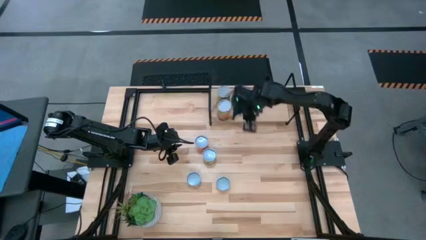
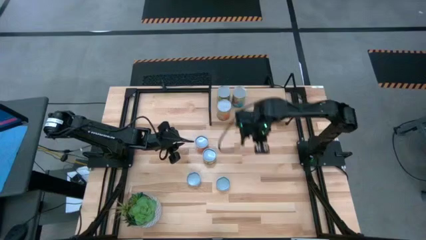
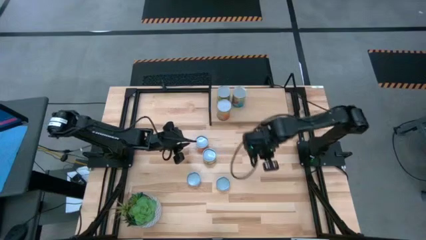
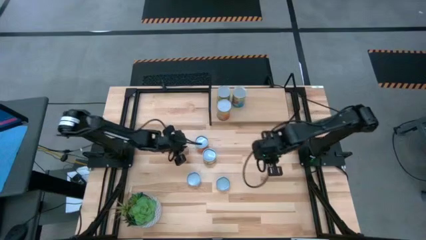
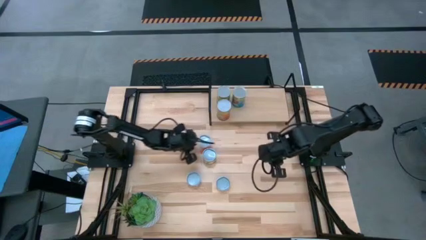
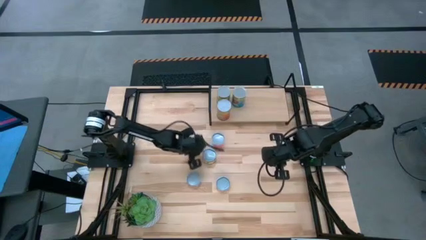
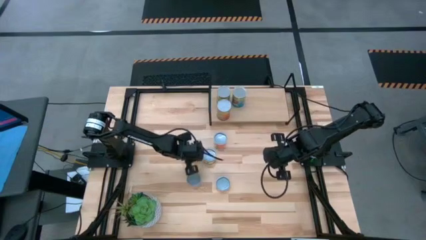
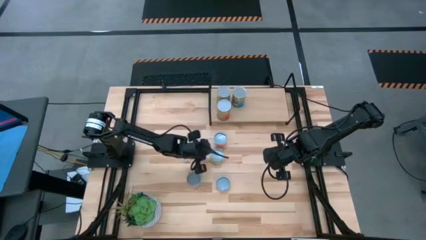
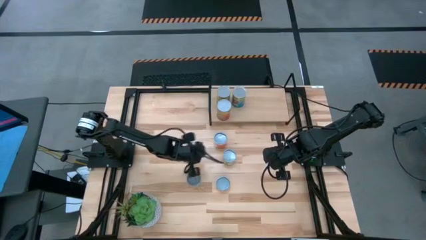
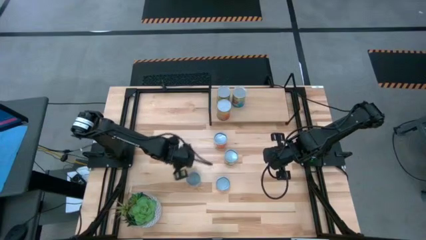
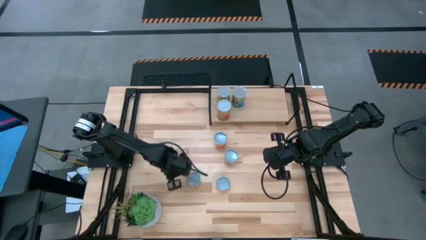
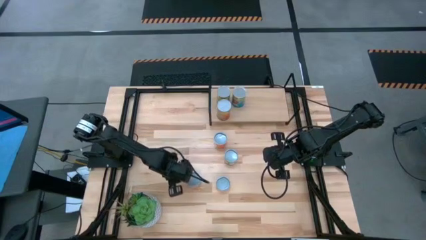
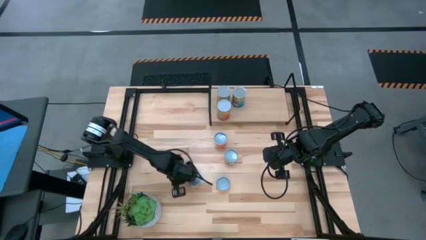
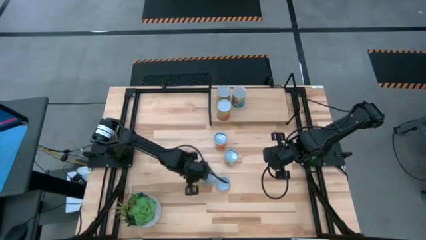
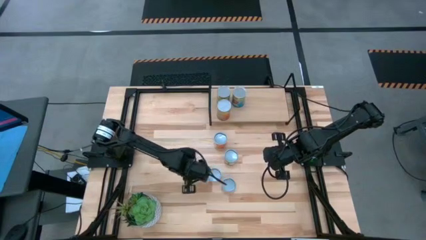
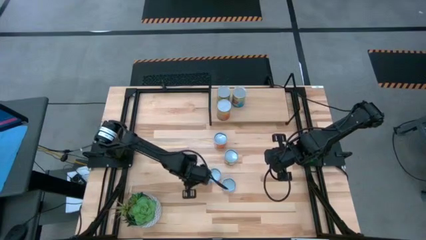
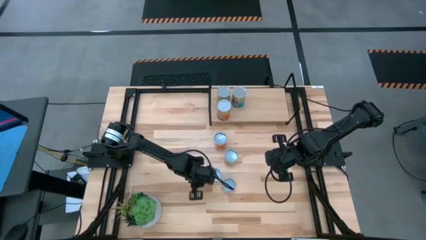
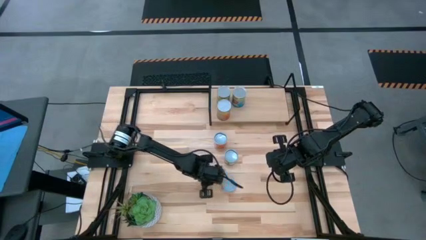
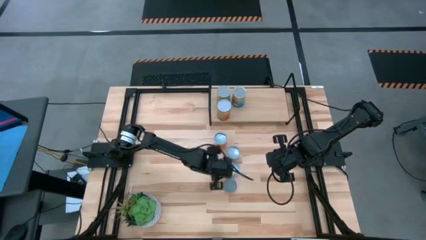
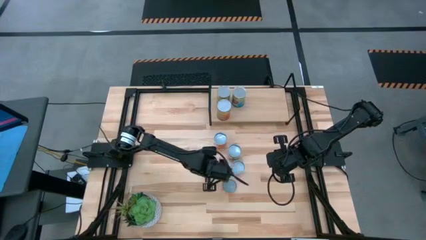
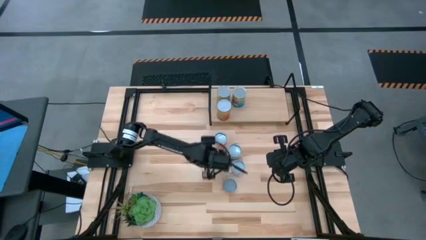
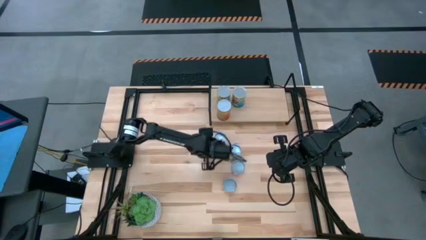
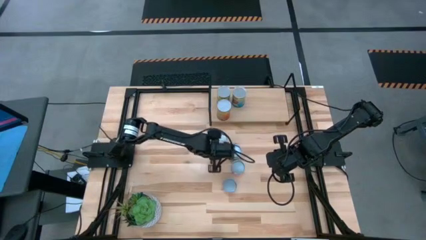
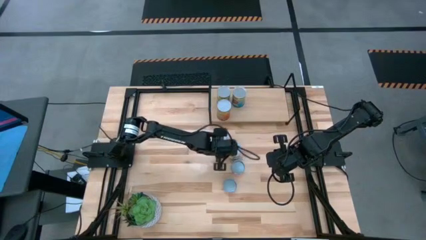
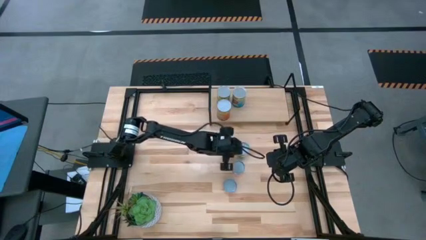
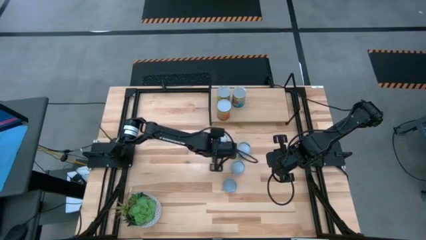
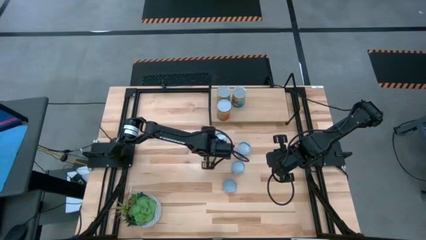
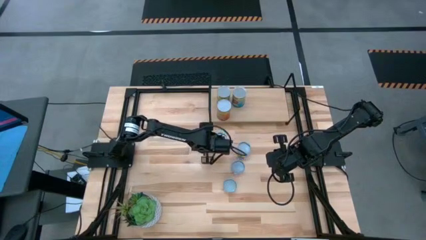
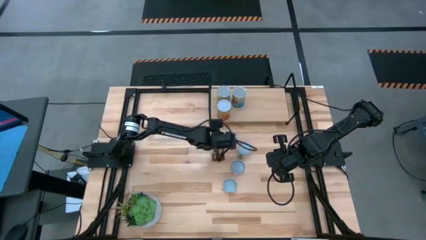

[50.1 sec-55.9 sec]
Task: Pick and place cans onto a shelf
Move the canned goods

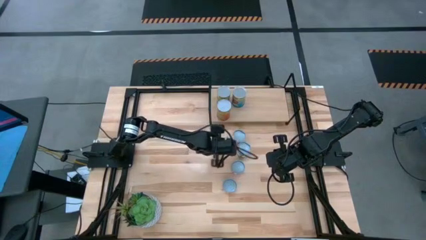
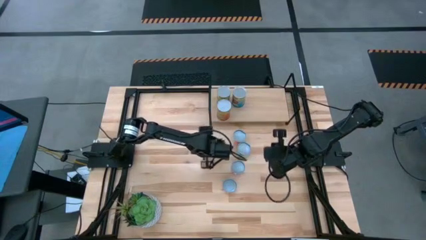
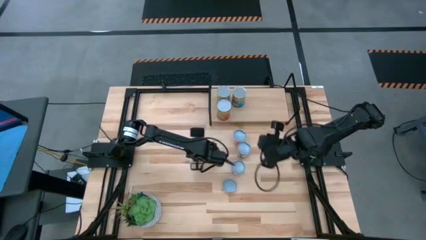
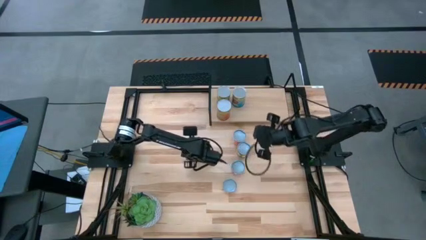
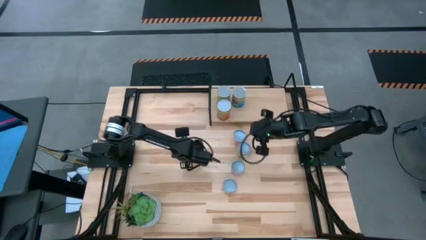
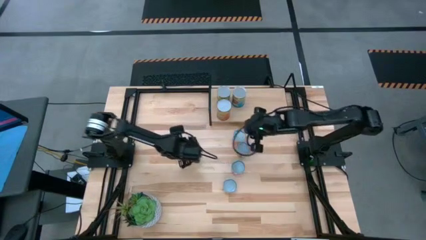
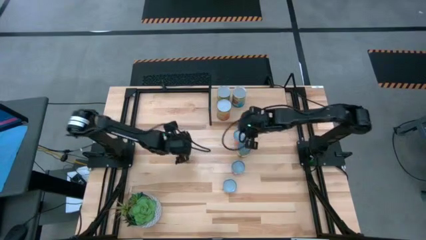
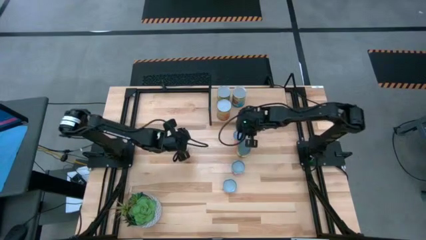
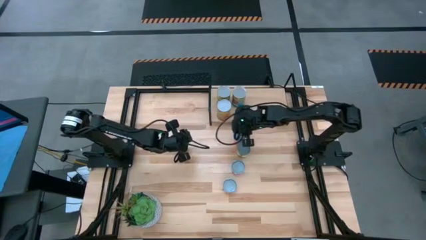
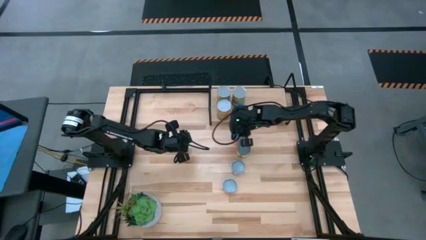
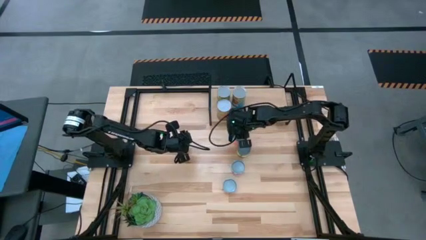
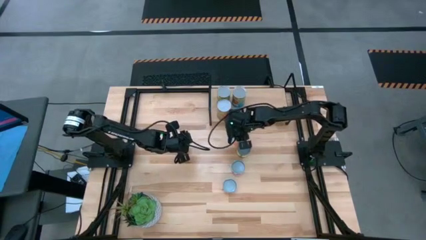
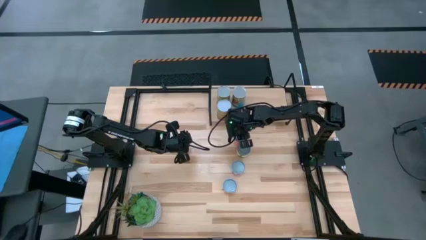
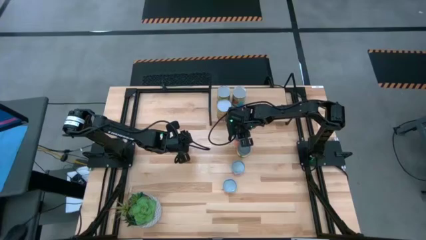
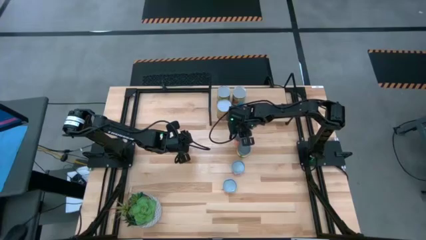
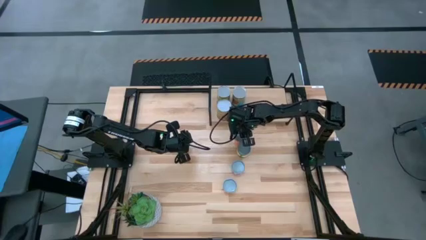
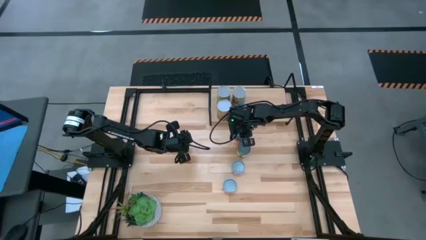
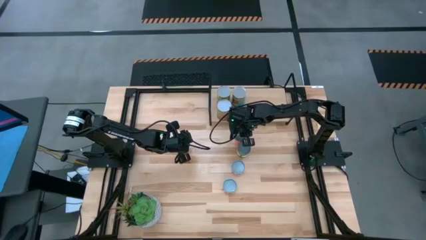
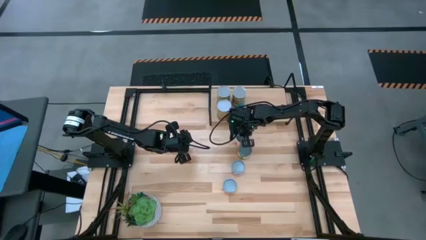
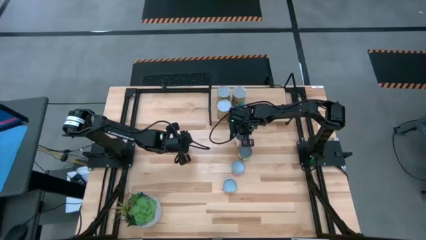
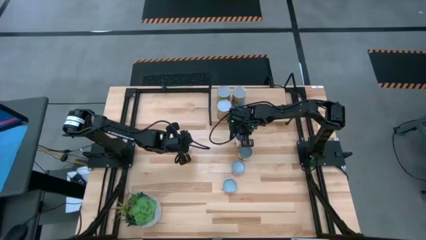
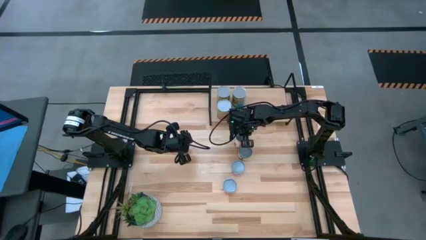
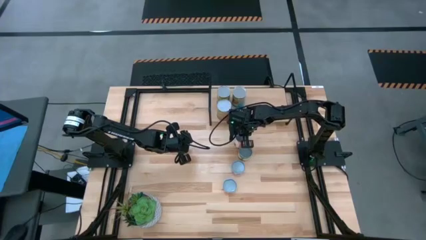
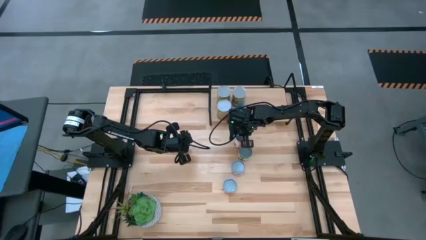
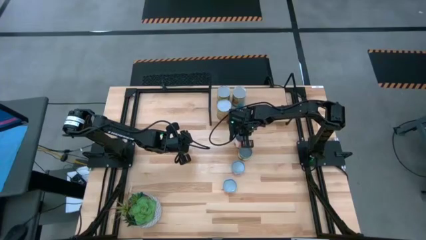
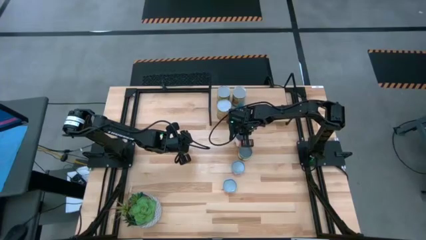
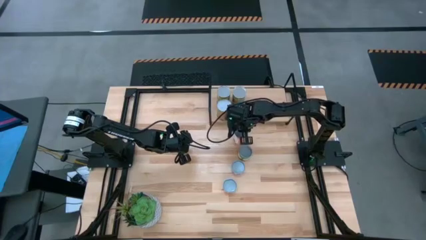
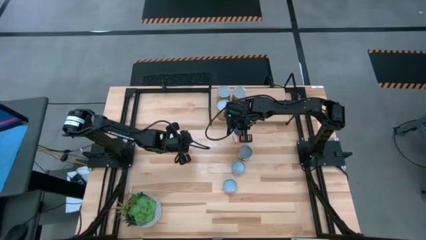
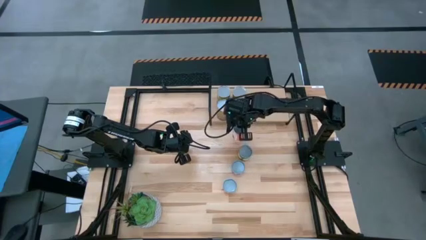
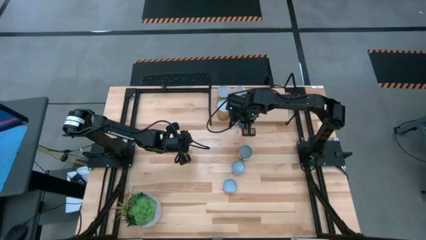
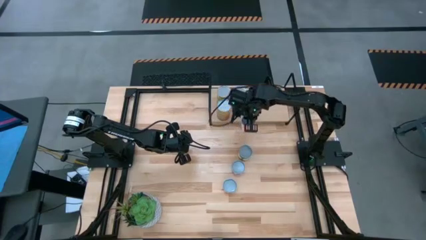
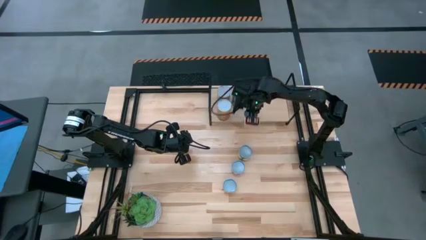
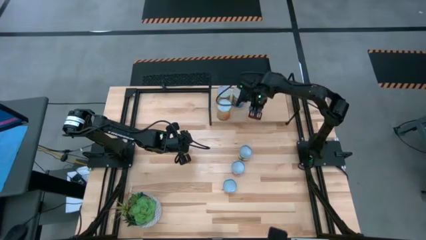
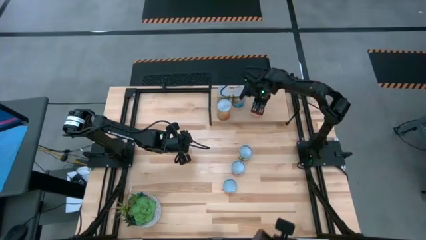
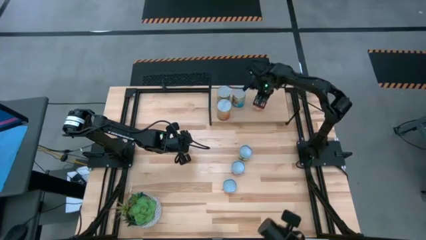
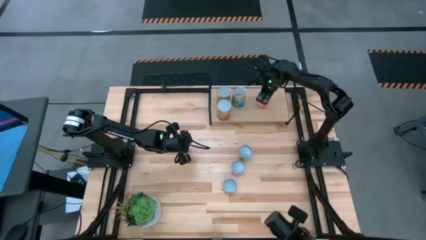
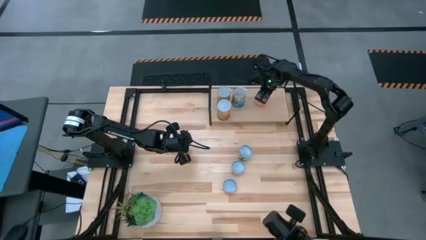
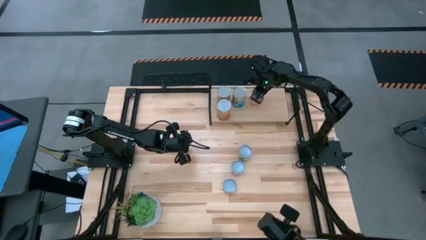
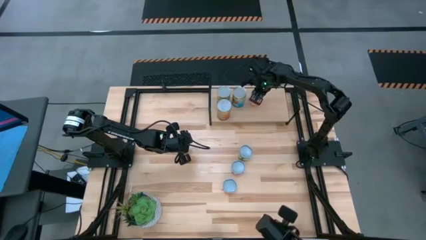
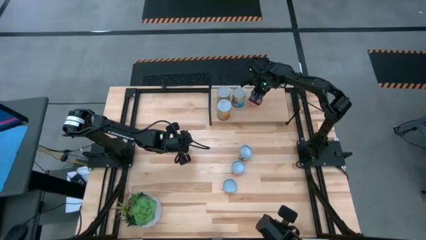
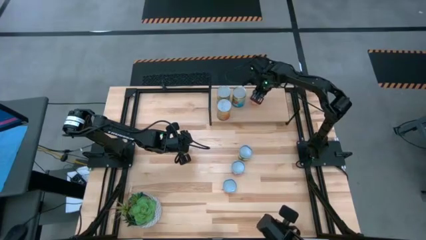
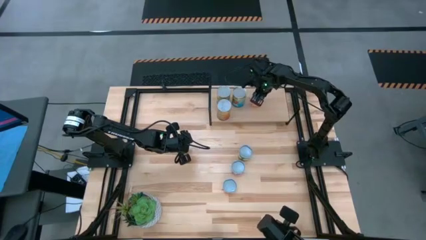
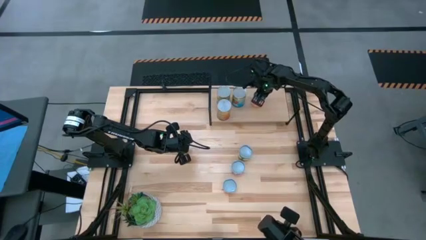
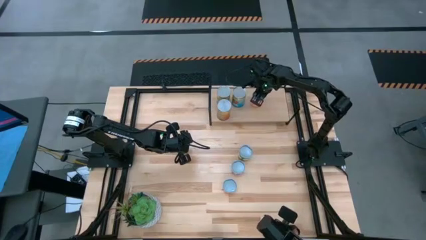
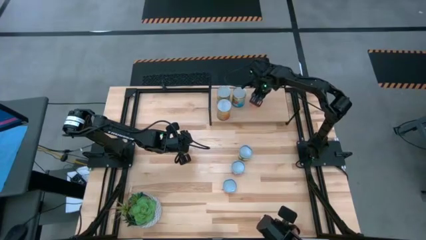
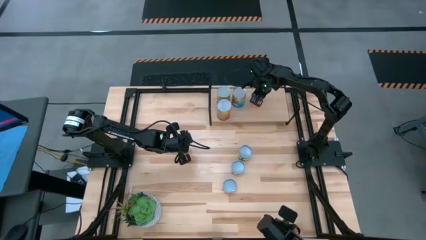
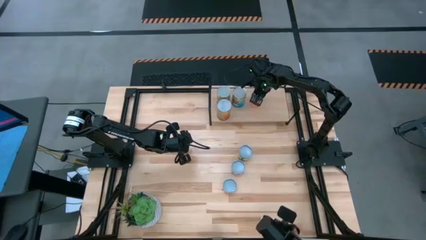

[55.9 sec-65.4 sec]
Put the canned sauce on the shelf
